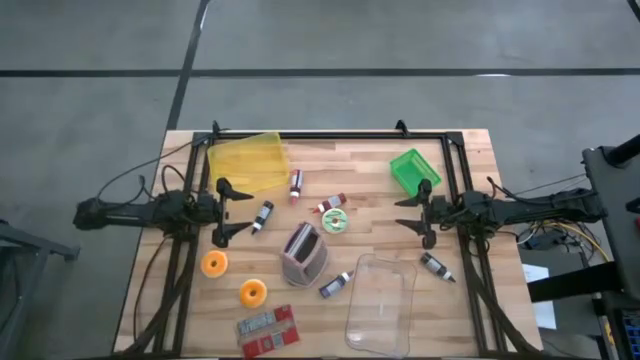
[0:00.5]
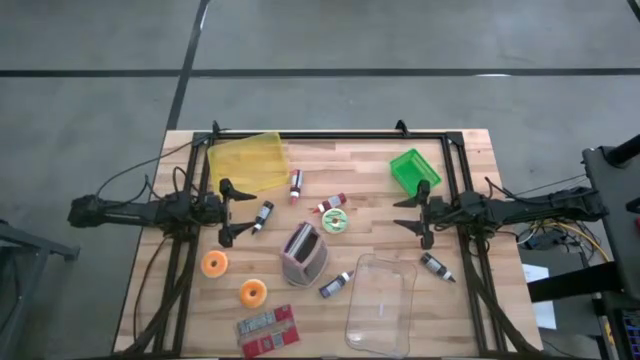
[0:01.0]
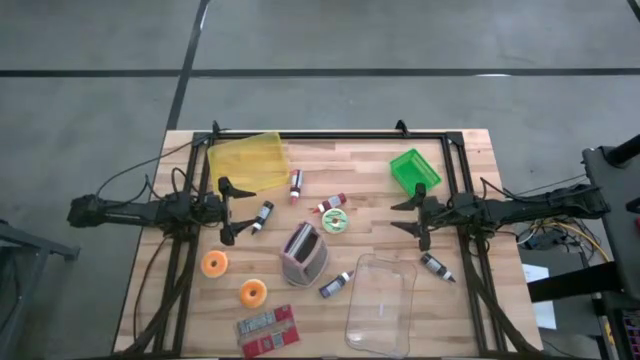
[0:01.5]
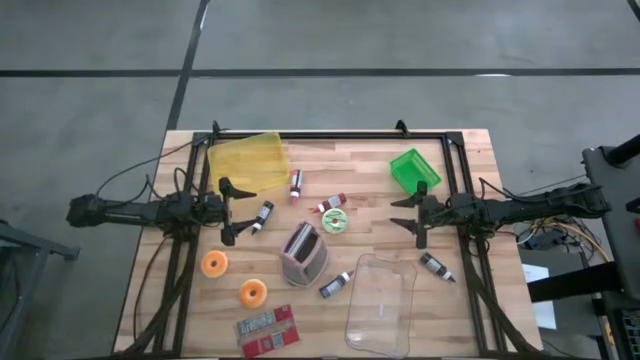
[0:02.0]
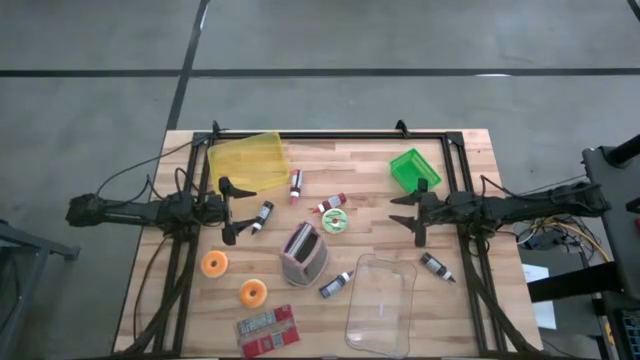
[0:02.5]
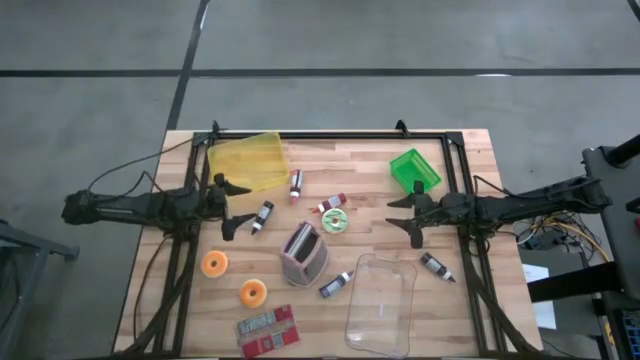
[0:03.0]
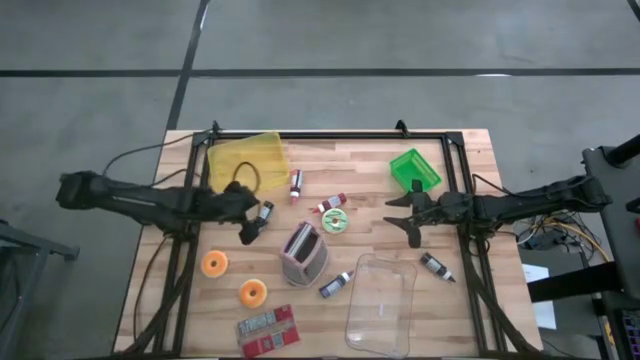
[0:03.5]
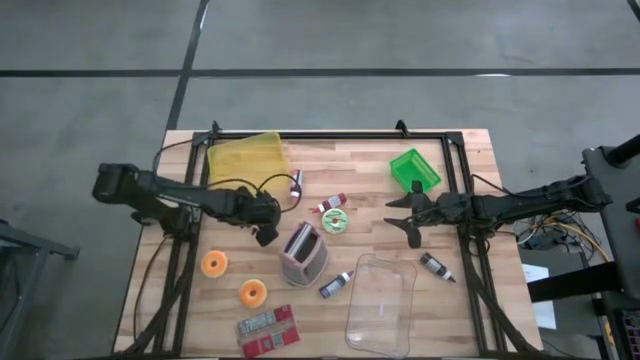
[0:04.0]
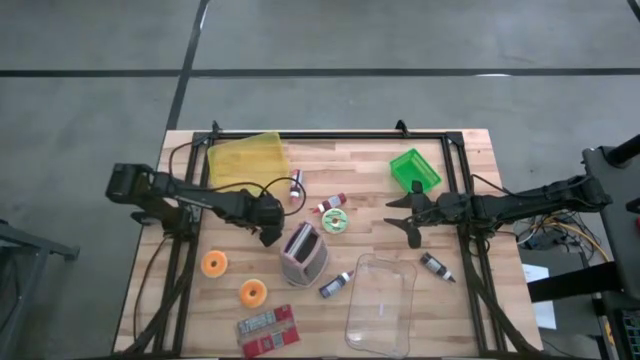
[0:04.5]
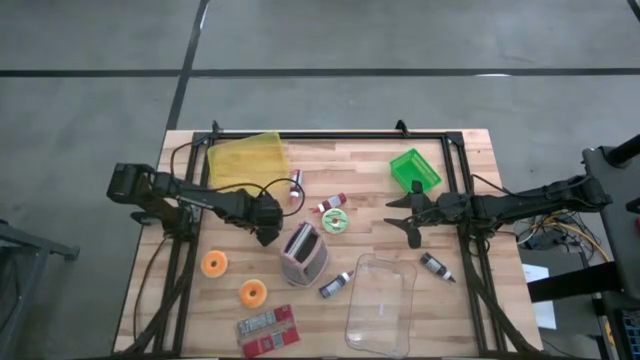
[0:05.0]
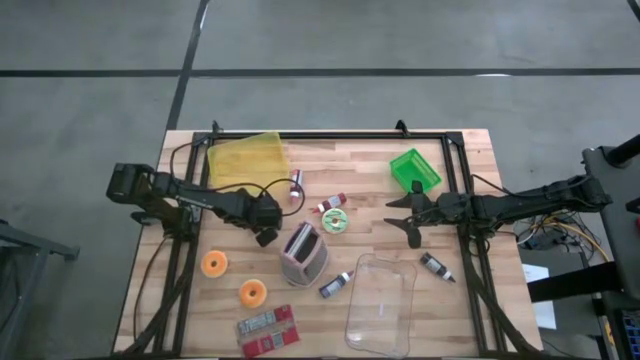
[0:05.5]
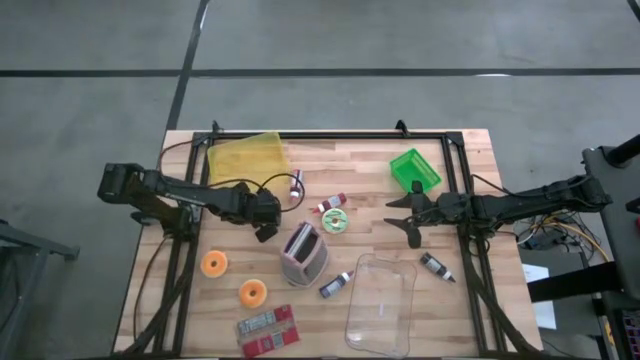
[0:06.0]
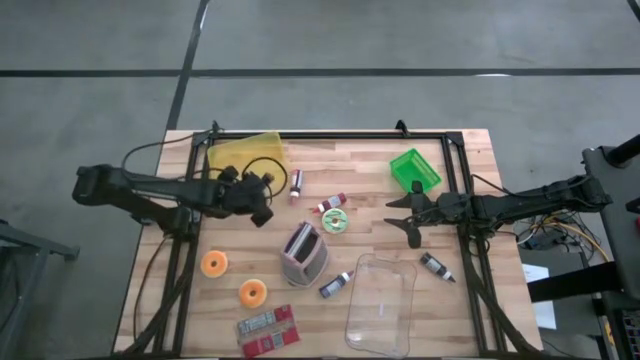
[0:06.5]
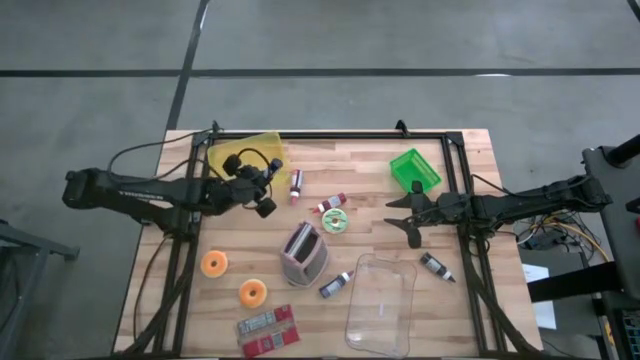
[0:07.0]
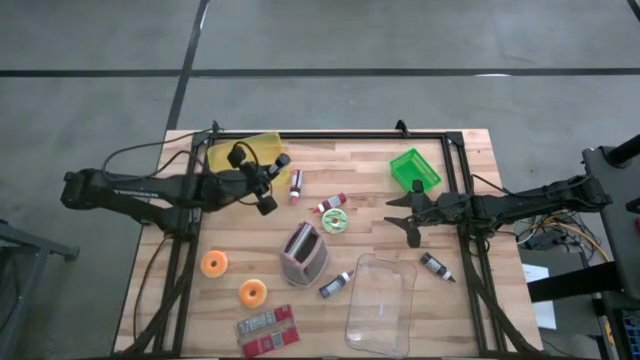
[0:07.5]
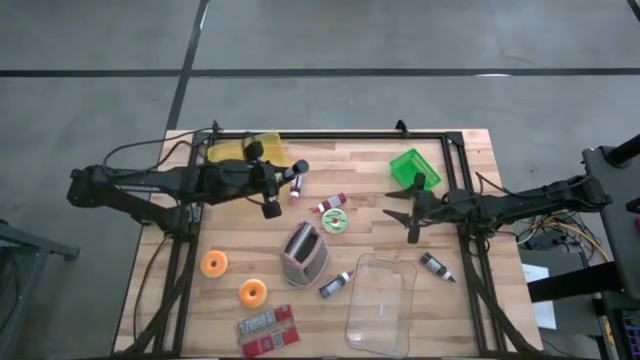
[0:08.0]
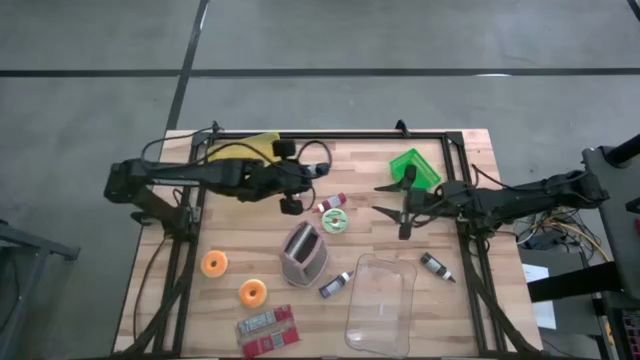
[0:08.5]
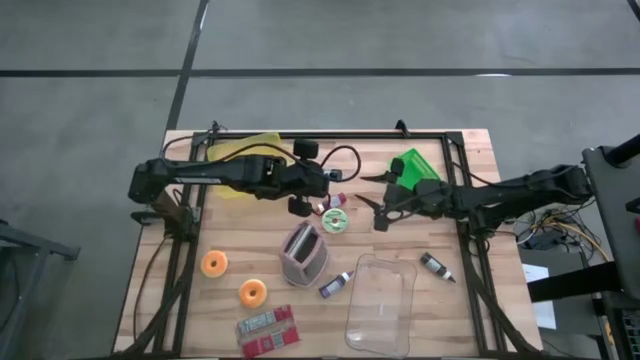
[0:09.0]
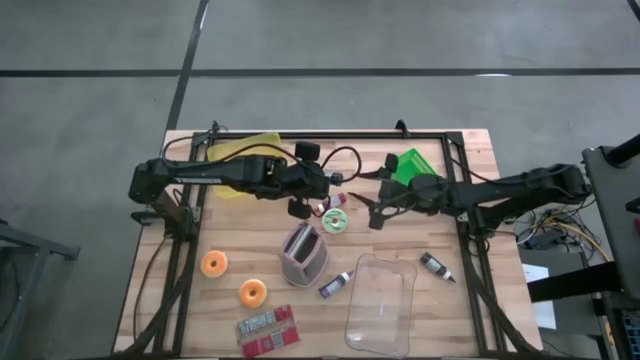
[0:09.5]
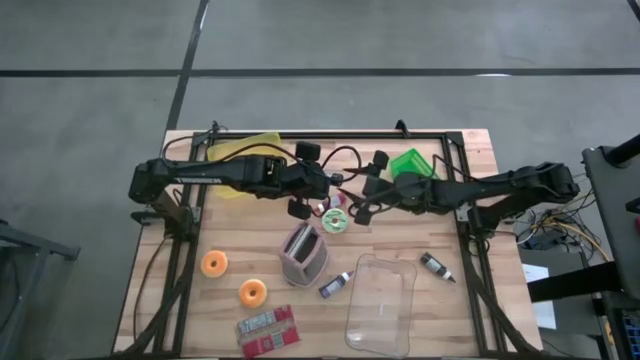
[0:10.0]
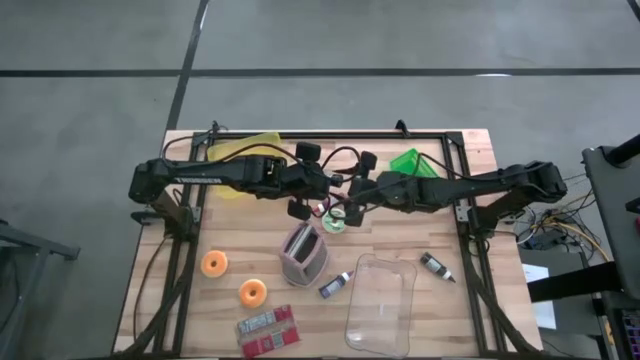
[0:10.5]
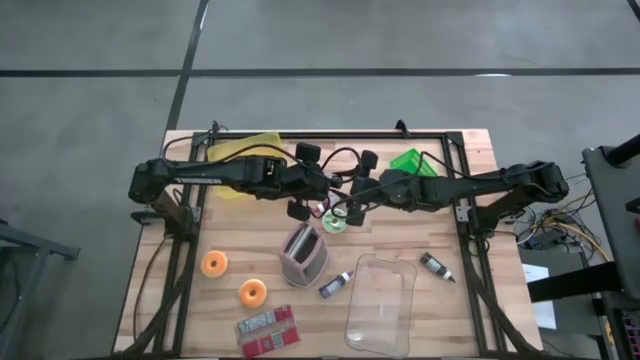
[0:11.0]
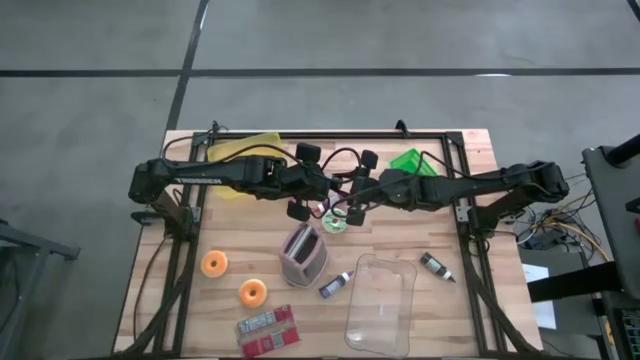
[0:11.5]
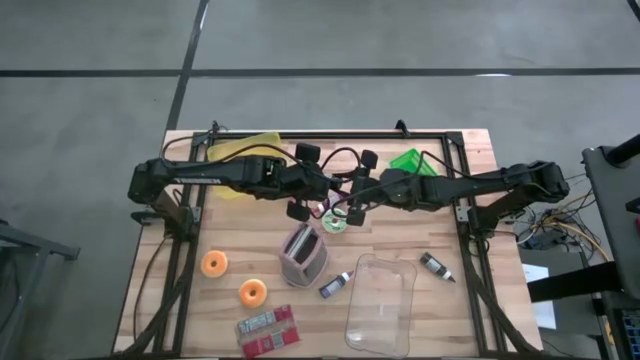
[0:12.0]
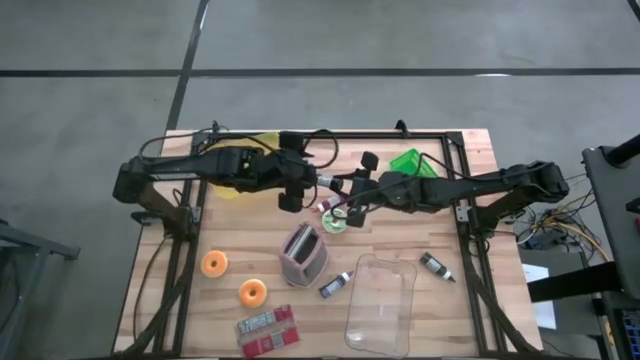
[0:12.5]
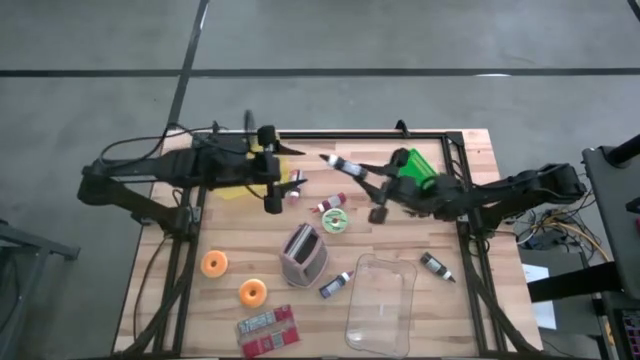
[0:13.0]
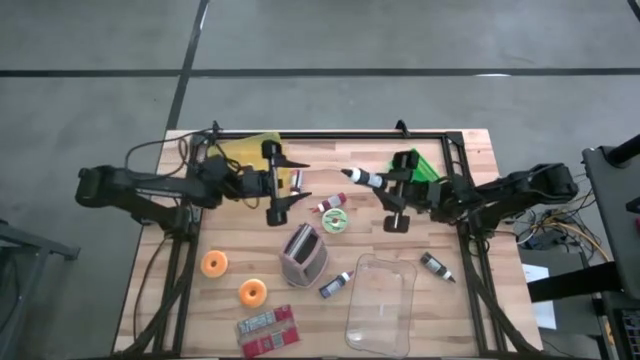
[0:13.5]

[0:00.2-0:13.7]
Task: Pick & Place Food Item
Put the left black food coloring into the yellow bin

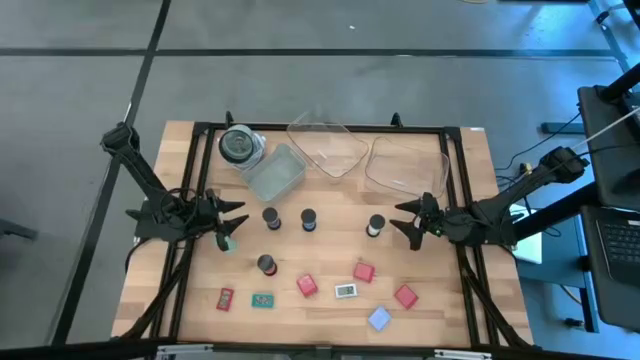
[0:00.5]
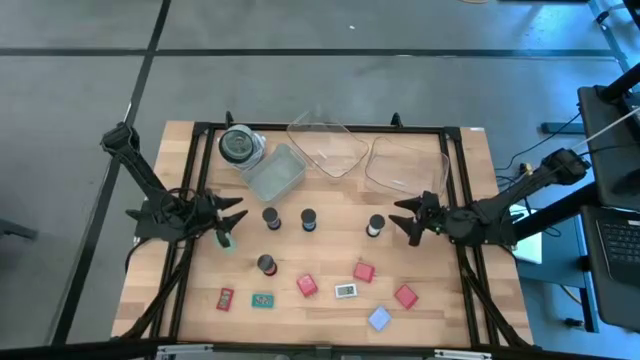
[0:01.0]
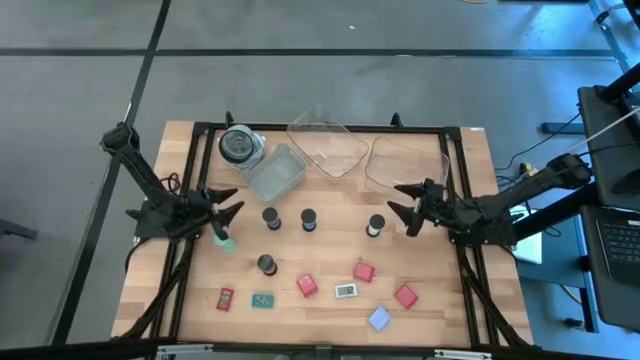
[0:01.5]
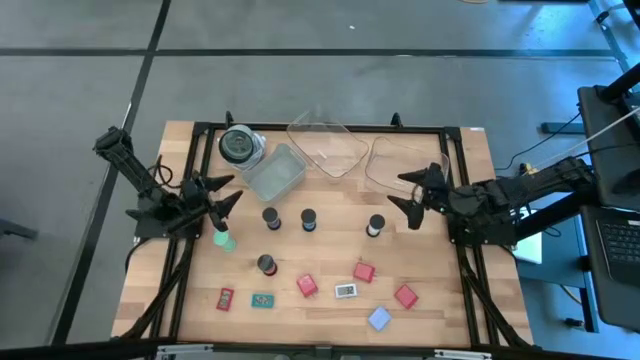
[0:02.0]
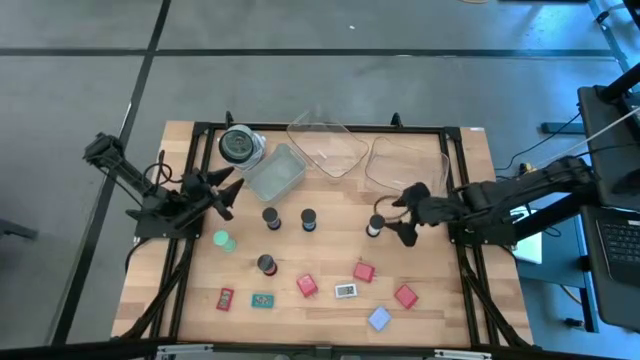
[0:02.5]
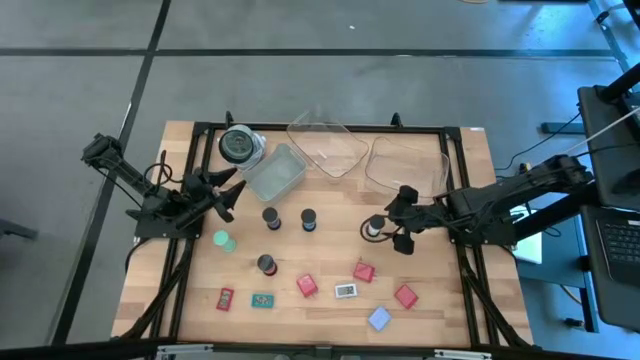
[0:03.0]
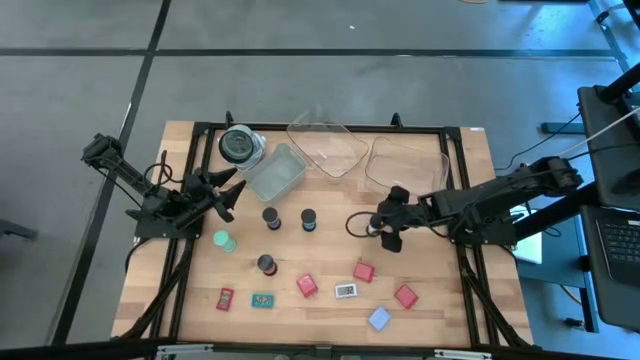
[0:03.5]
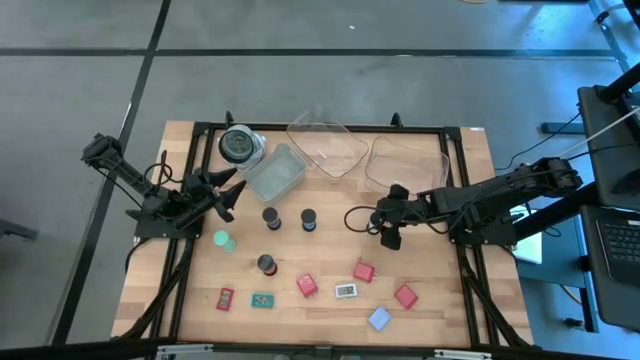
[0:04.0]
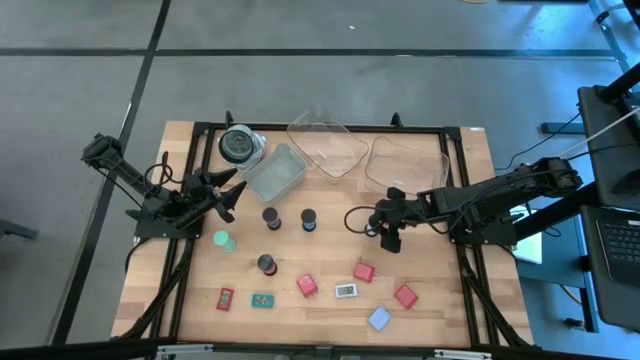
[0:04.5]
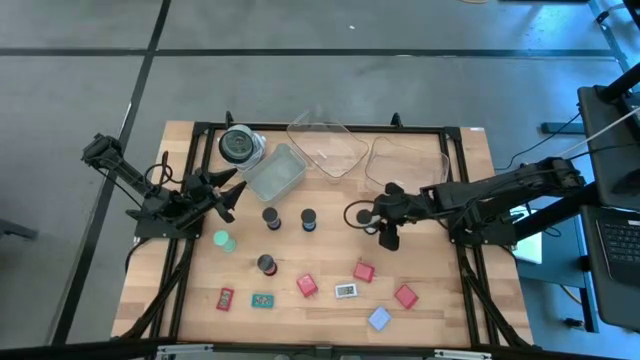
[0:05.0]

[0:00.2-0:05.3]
Task: Pick & Place Office items
Put the white hourglass into the right transparent bin
